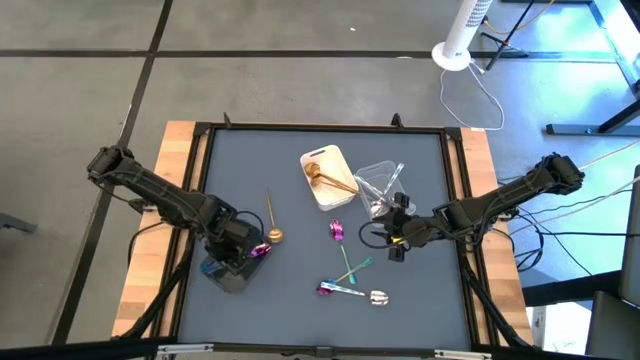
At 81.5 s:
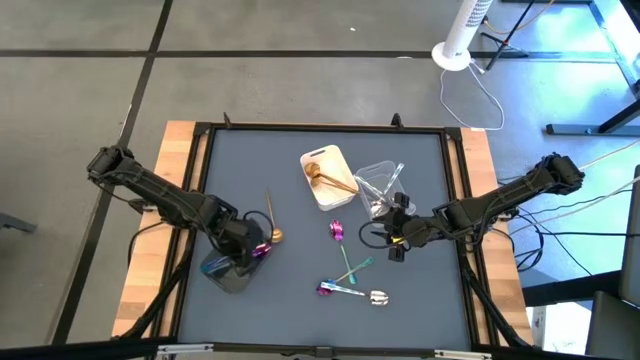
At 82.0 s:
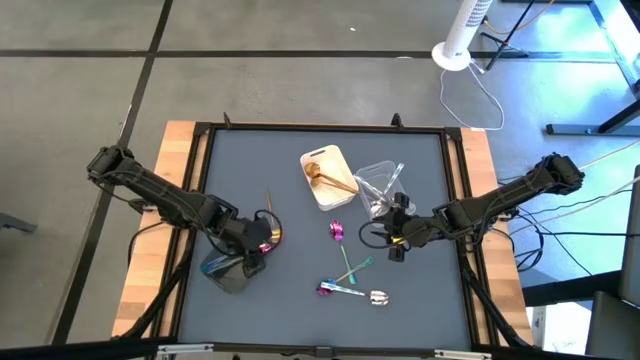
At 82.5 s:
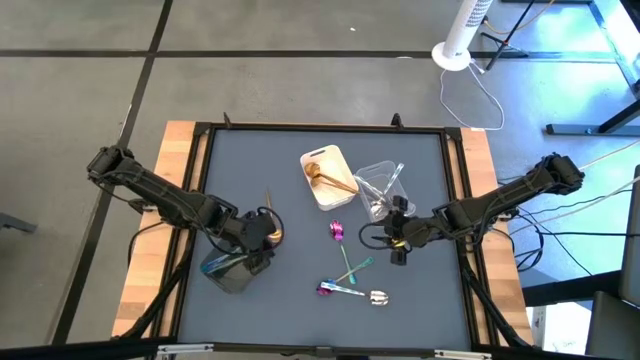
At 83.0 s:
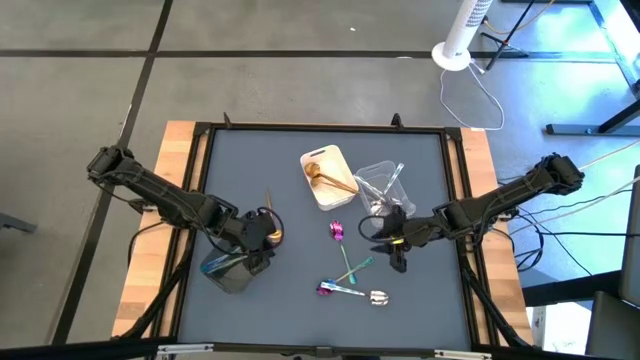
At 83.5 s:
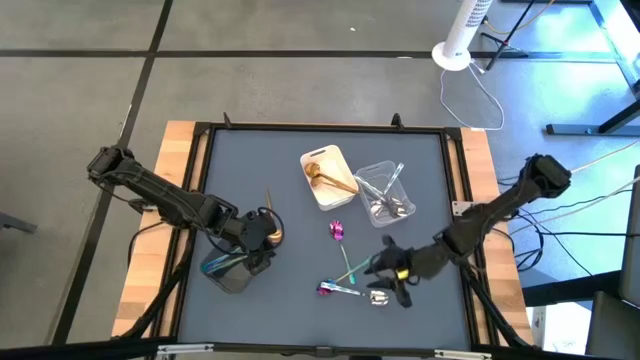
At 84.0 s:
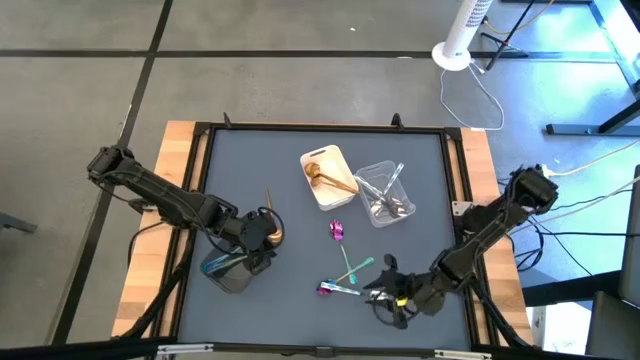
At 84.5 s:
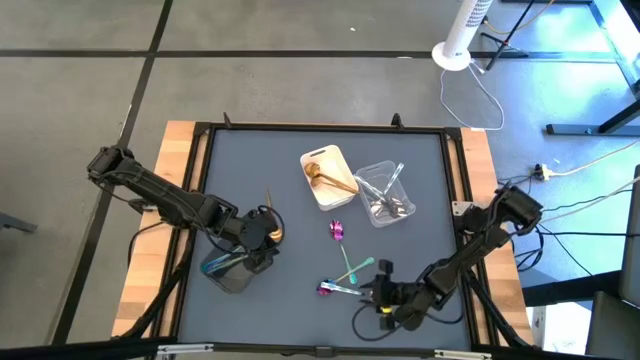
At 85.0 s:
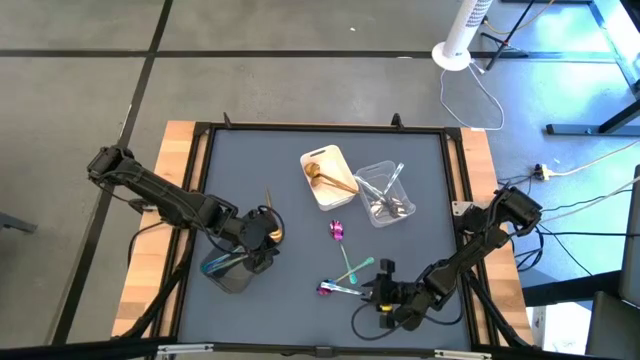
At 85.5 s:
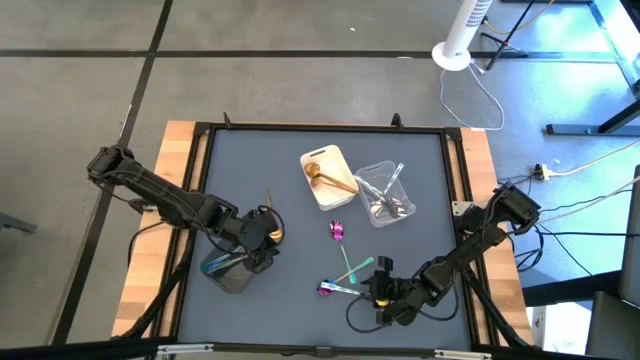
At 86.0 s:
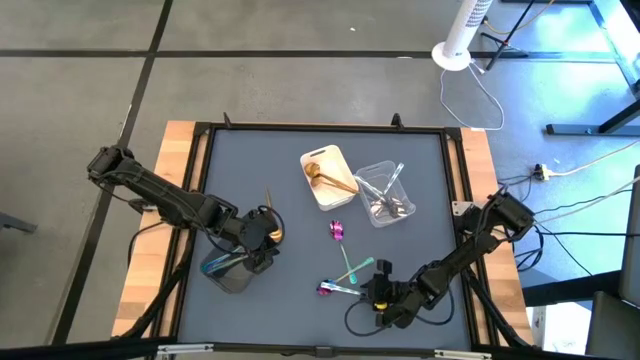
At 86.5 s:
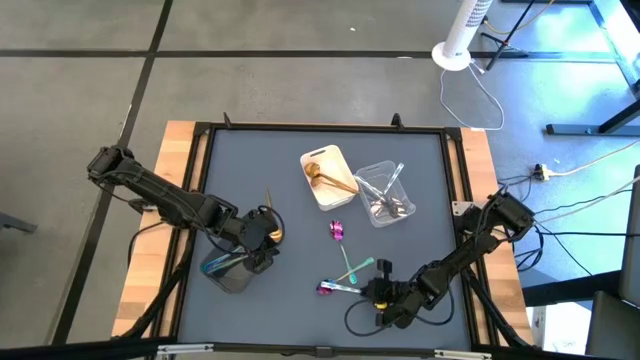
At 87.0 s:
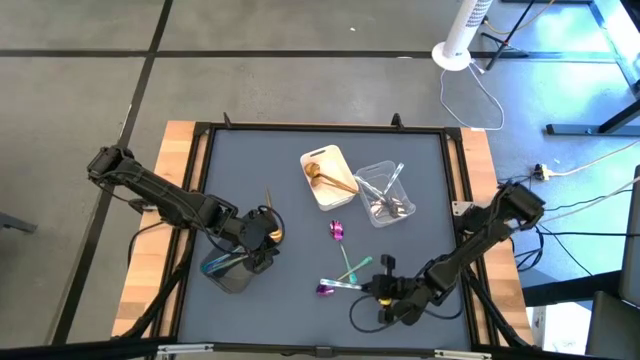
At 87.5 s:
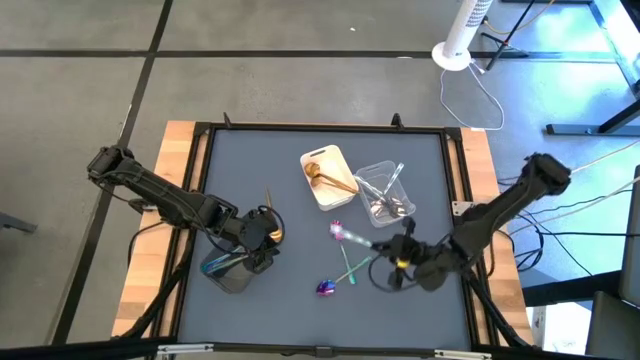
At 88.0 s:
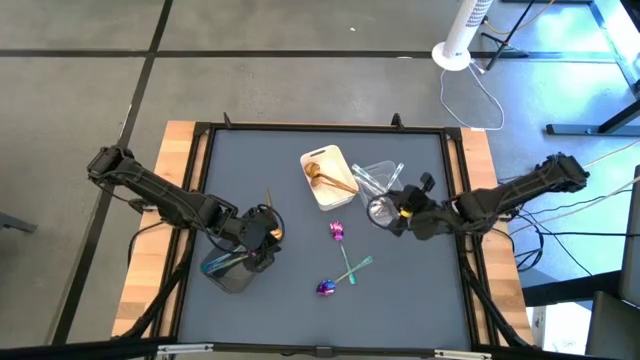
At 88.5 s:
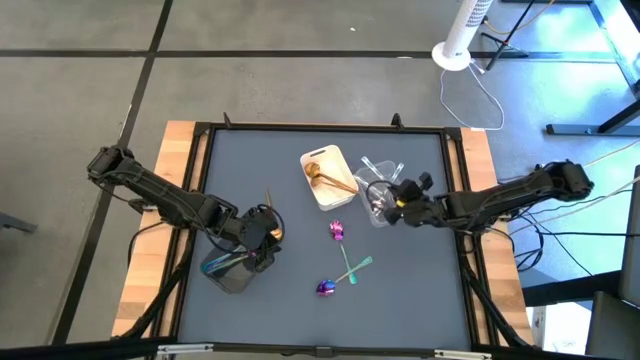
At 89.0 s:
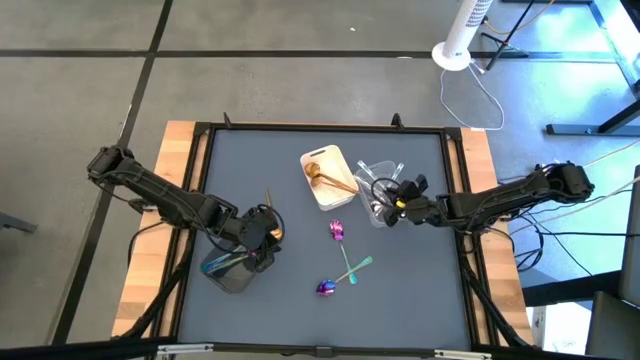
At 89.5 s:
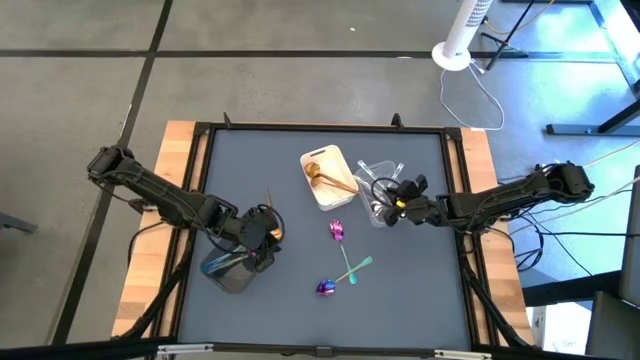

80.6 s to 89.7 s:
Task: Sort silverware by color (type)
Put the green spoon into the transparent bin

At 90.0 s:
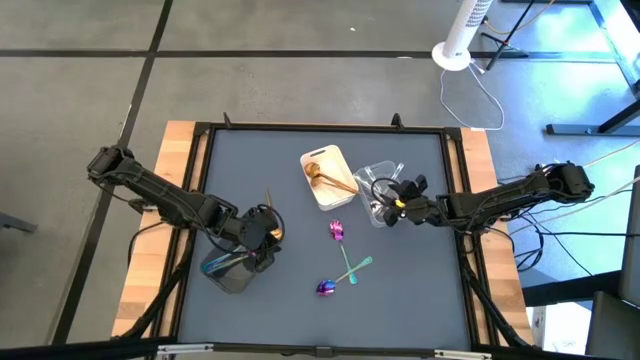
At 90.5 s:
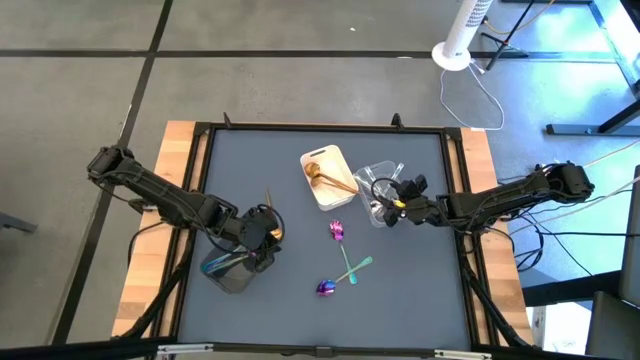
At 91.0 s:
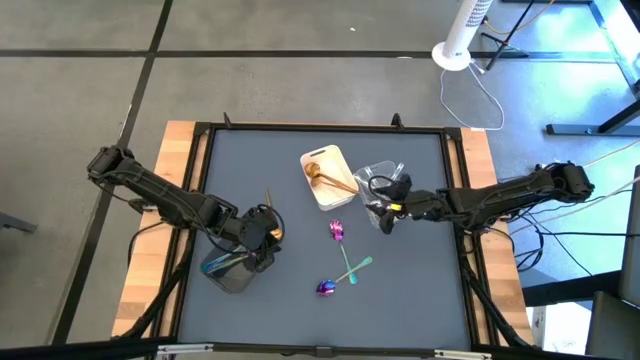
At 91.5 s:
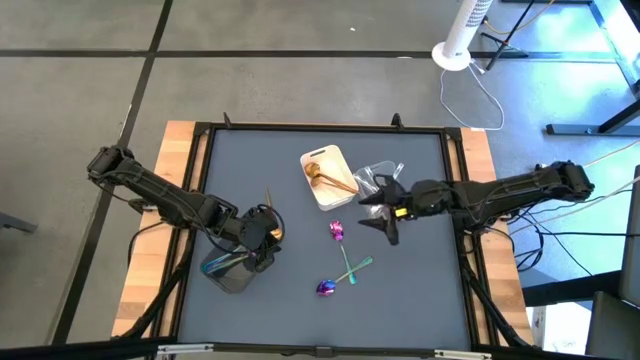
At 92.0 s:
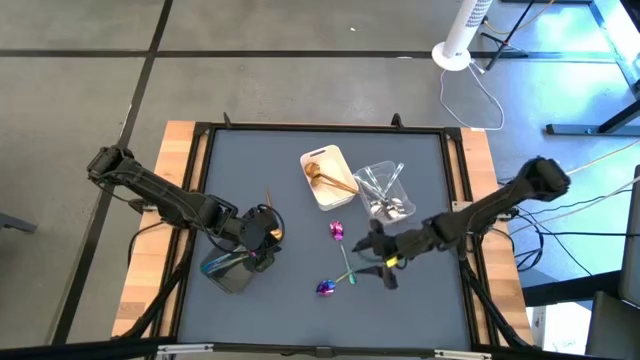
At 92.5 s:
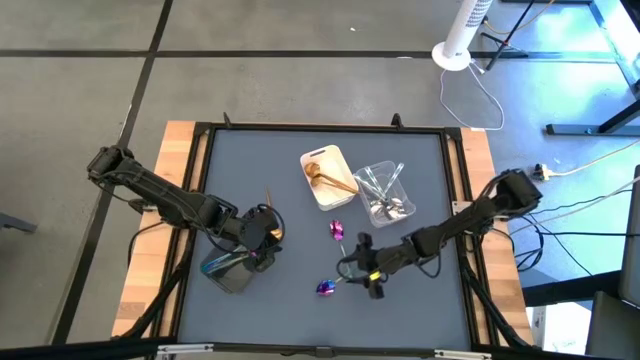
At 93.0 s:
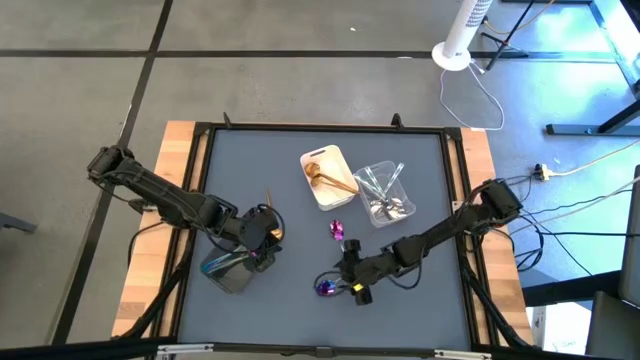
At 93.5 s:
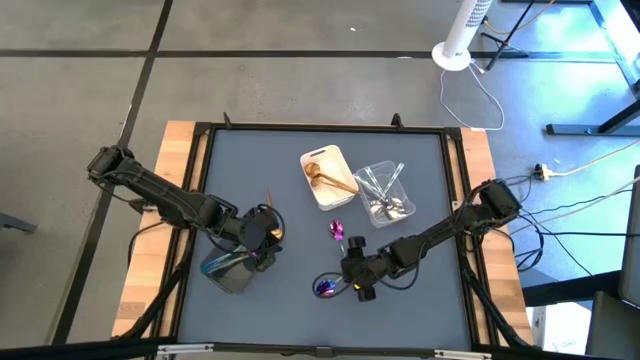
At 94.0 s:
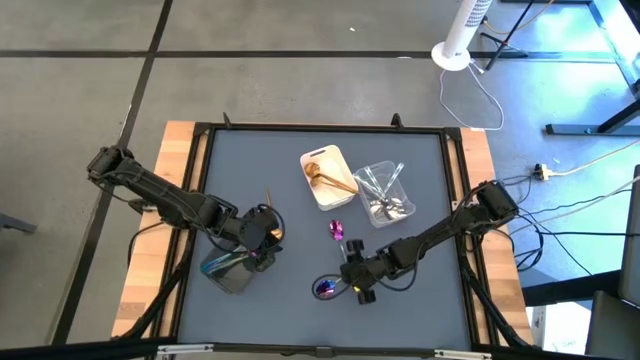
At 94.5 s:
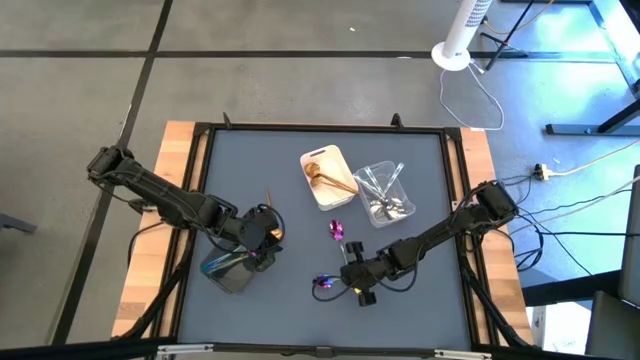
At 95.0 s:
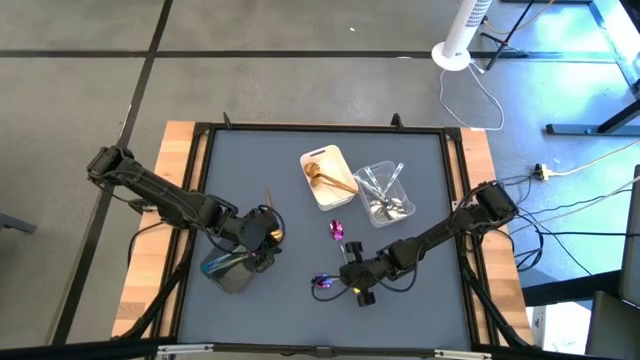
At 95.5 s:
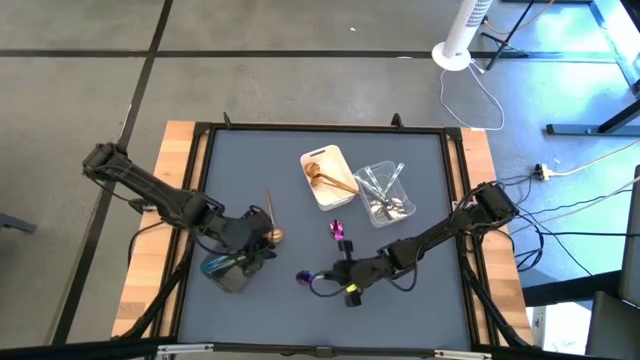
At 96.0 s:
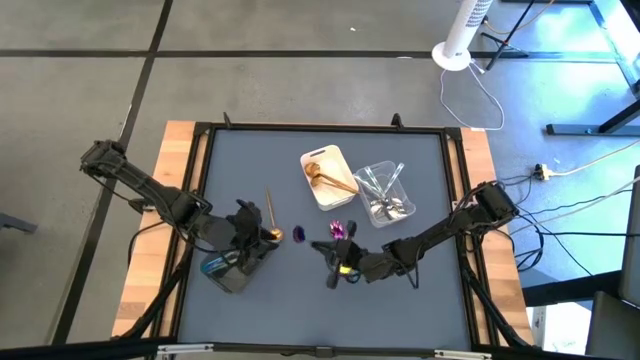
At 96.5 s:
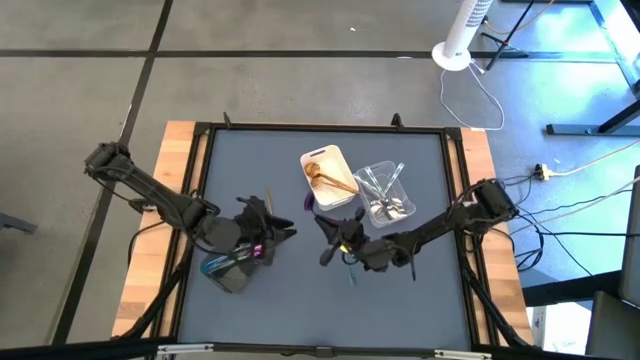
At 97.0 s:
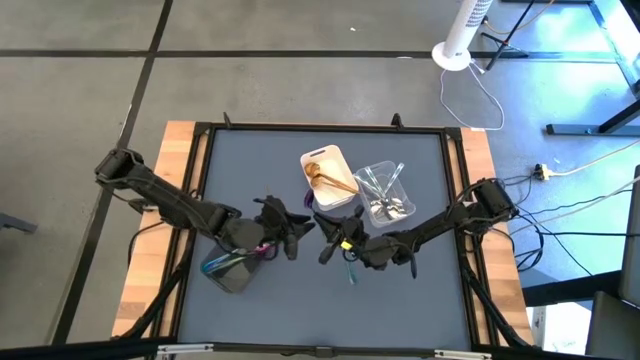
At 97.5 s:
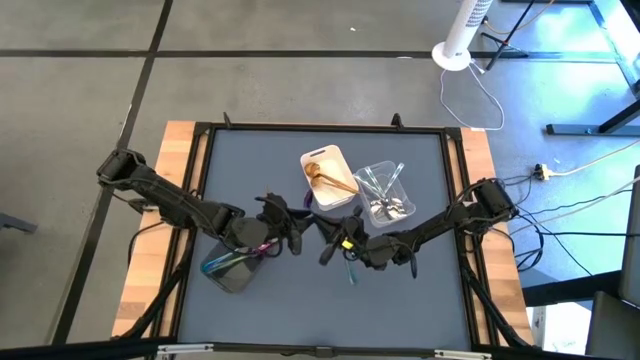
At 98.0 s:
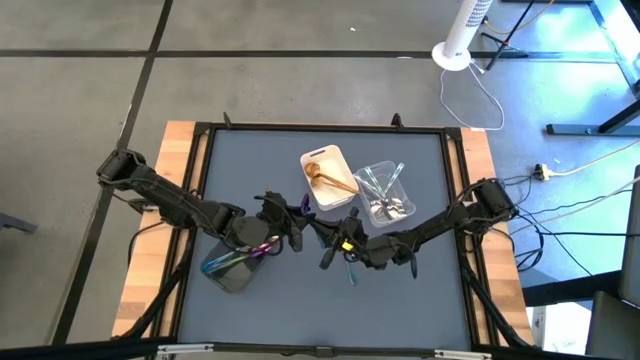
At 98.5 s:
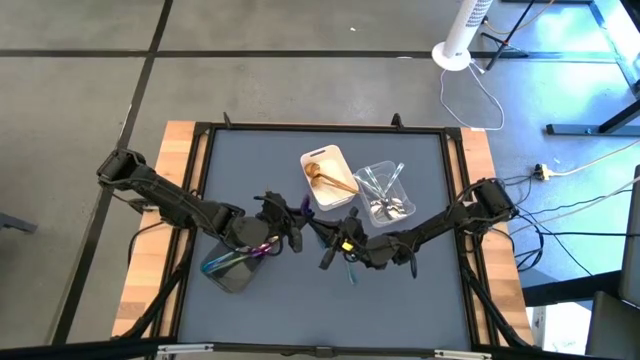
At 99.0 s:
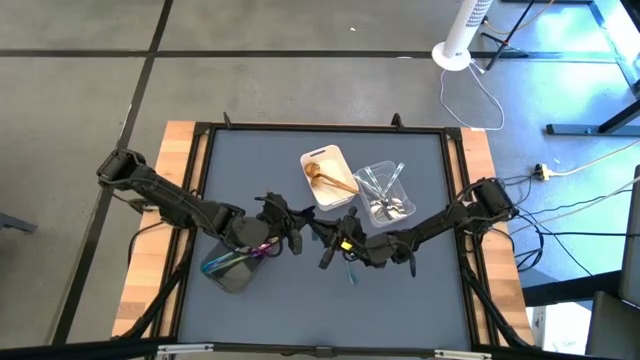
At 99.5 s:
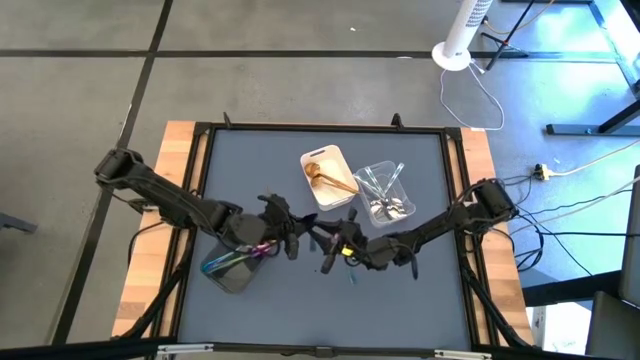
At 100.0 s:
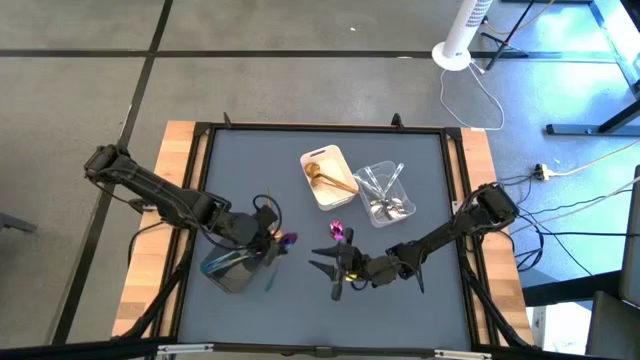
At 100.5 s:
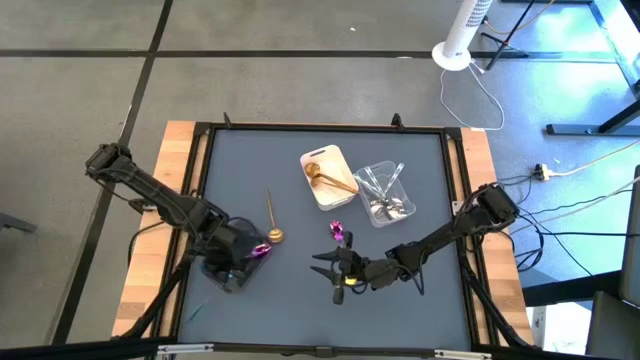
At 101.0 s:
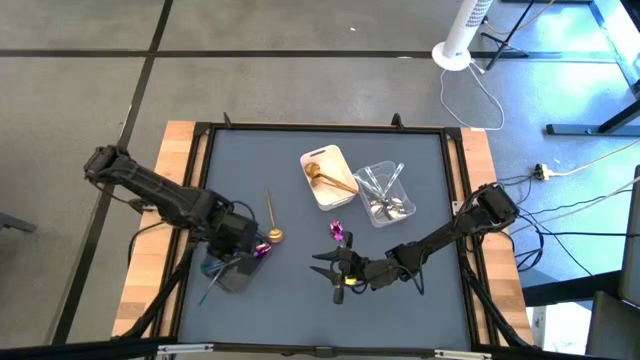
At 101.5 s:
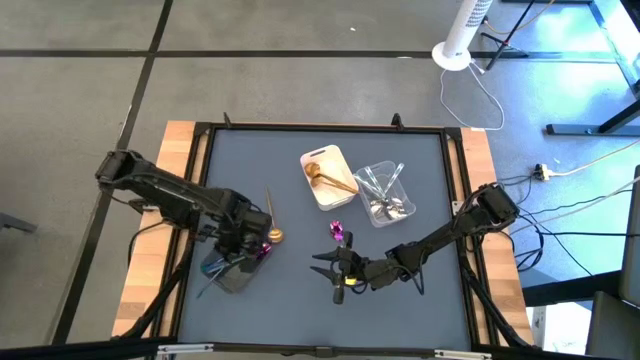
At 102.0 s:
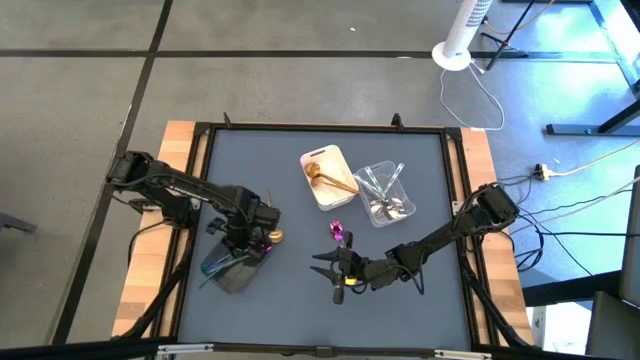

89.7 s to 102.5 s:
Put the iridescent spoon into the black bin
